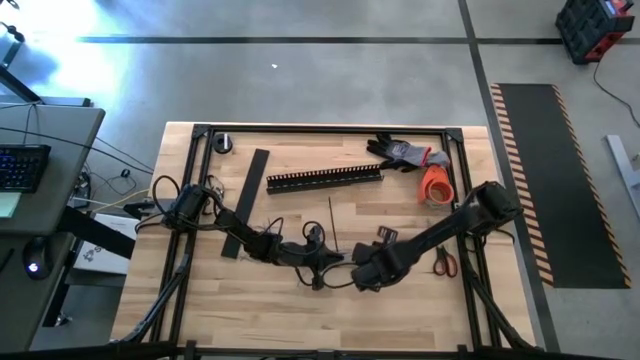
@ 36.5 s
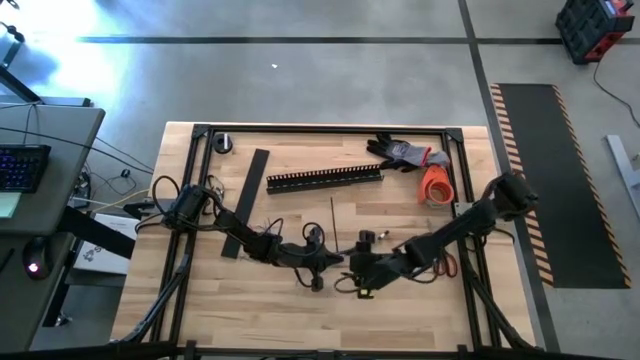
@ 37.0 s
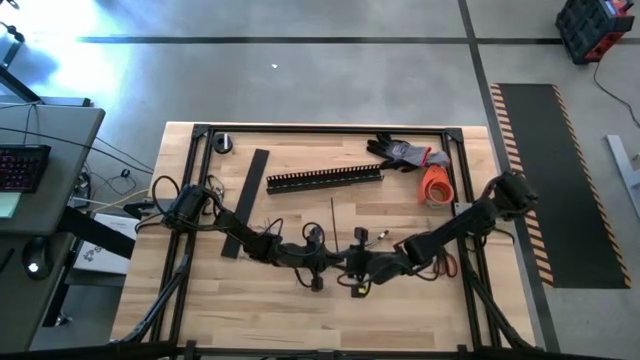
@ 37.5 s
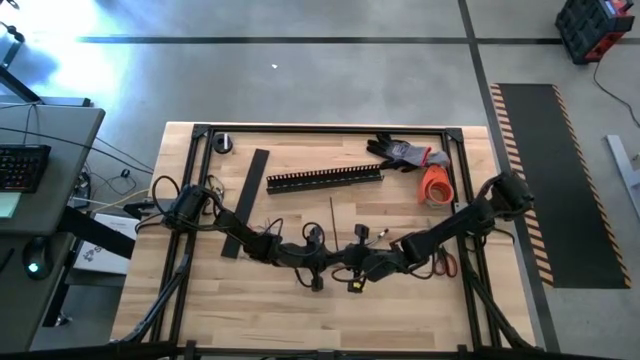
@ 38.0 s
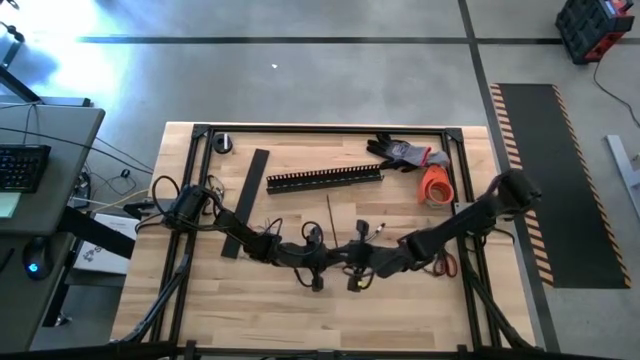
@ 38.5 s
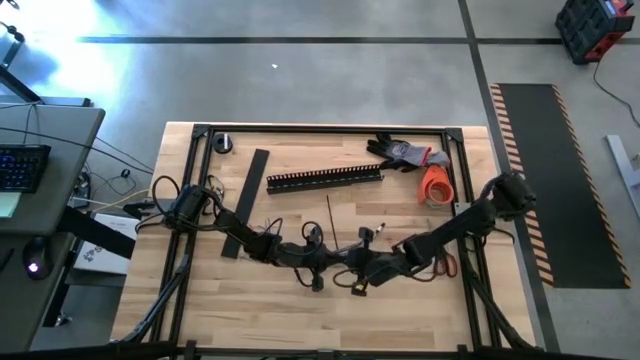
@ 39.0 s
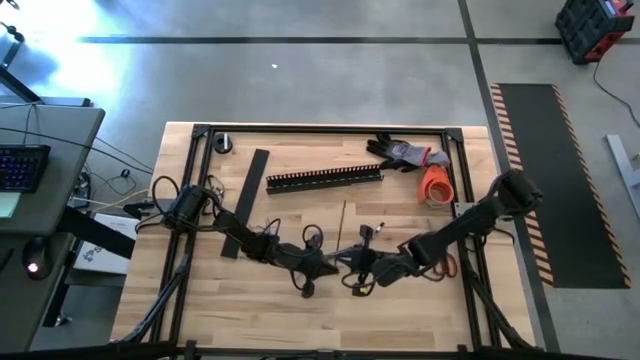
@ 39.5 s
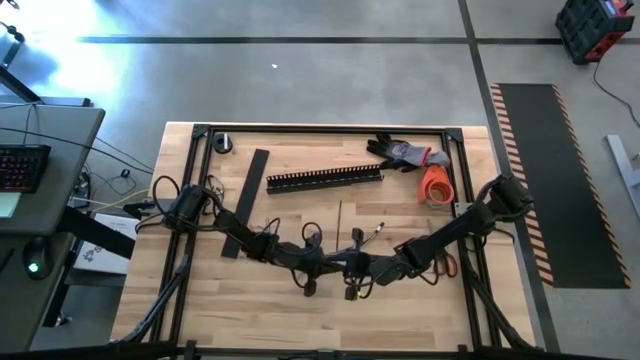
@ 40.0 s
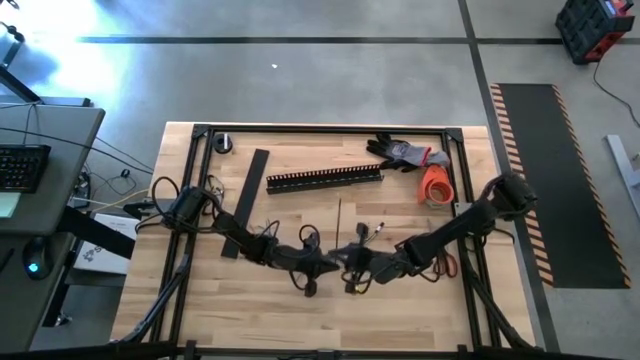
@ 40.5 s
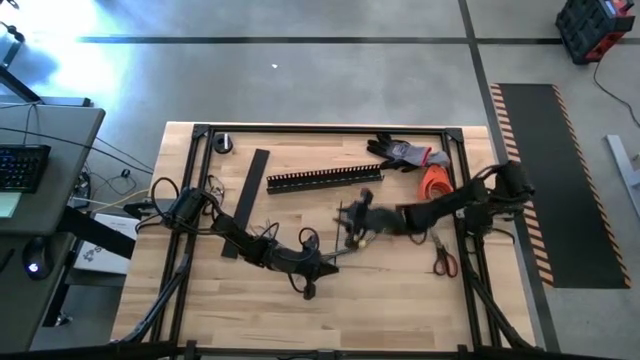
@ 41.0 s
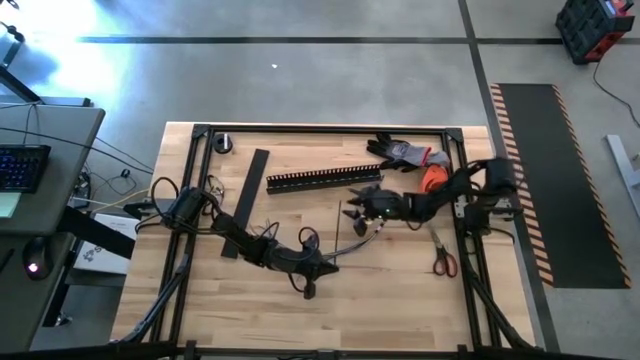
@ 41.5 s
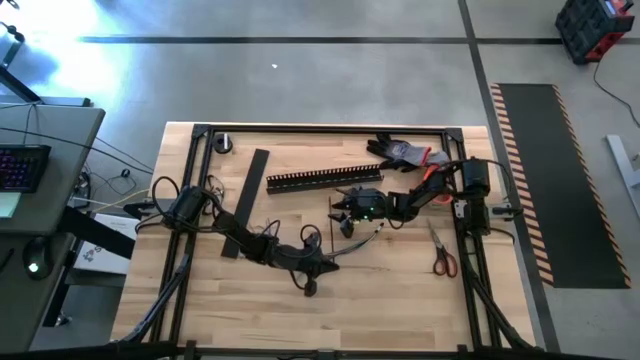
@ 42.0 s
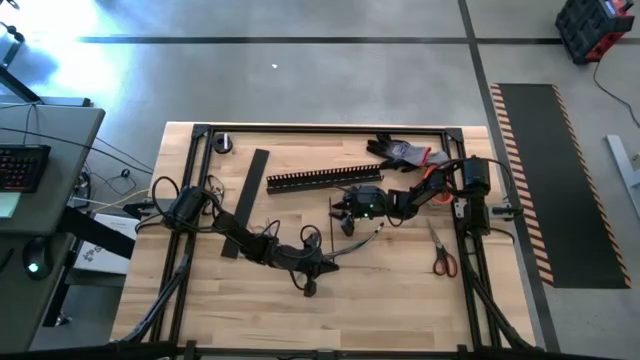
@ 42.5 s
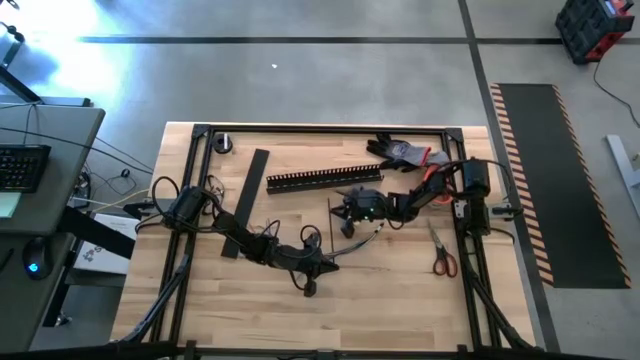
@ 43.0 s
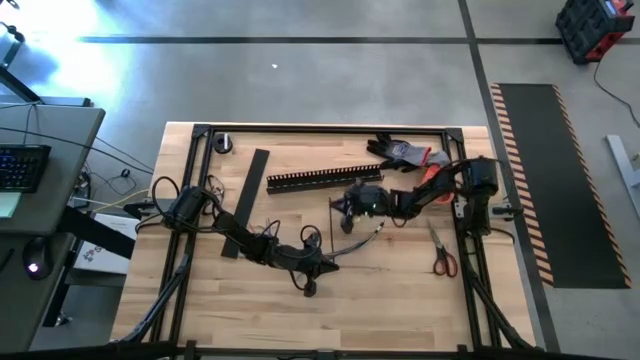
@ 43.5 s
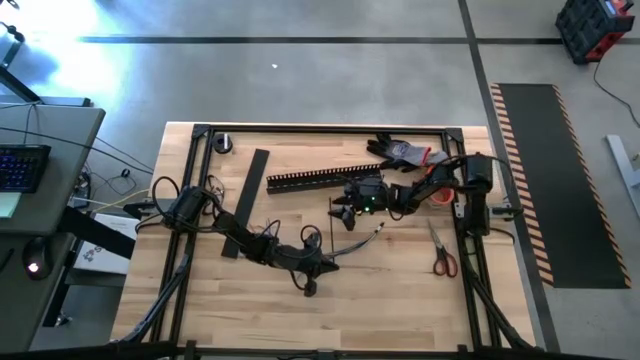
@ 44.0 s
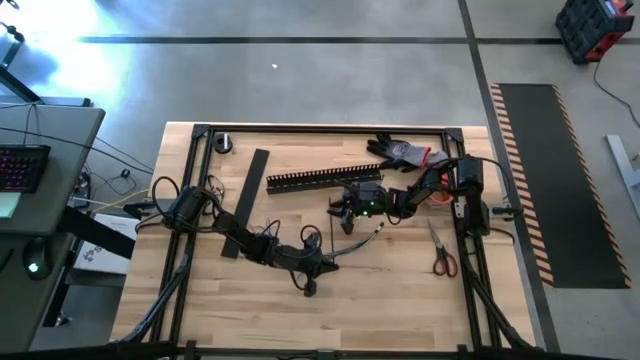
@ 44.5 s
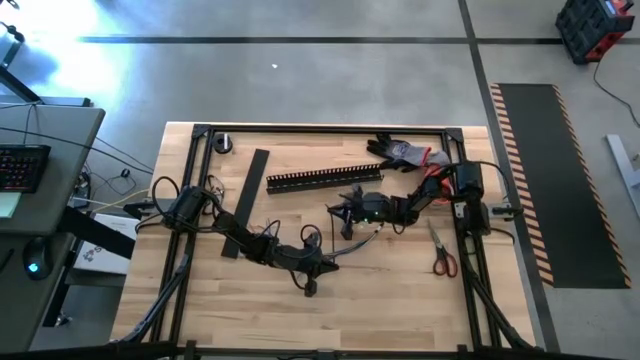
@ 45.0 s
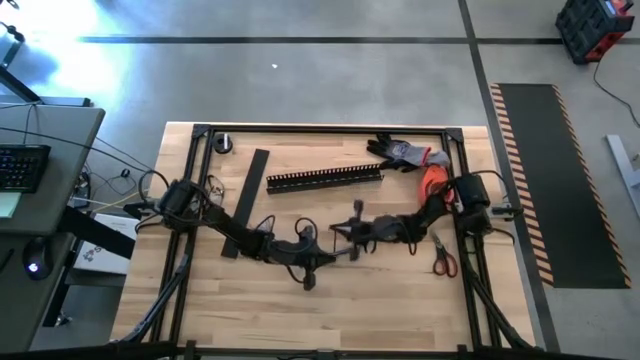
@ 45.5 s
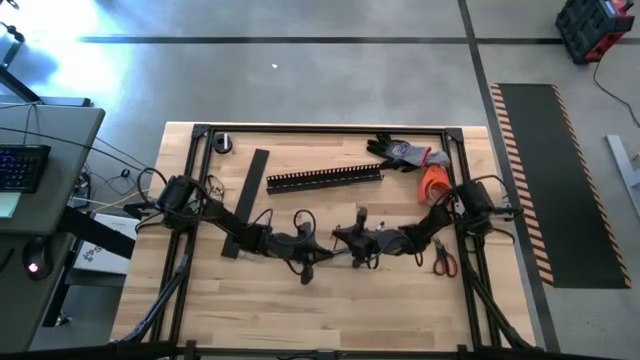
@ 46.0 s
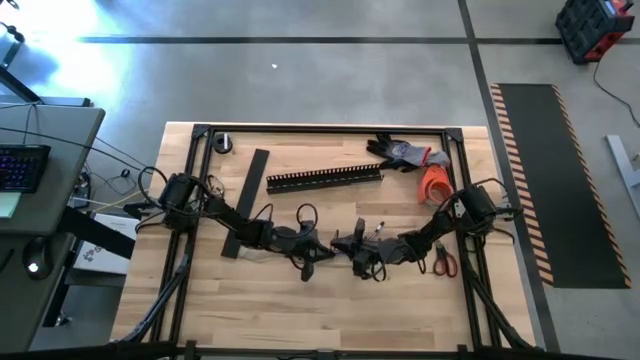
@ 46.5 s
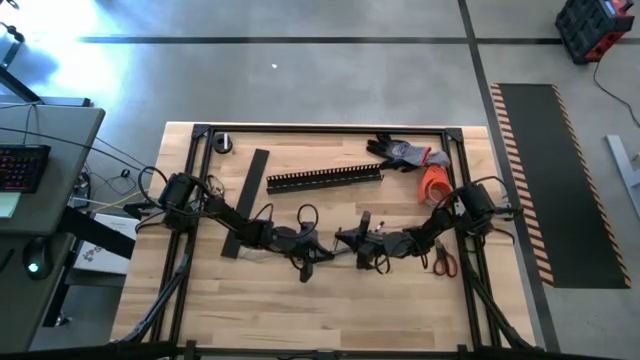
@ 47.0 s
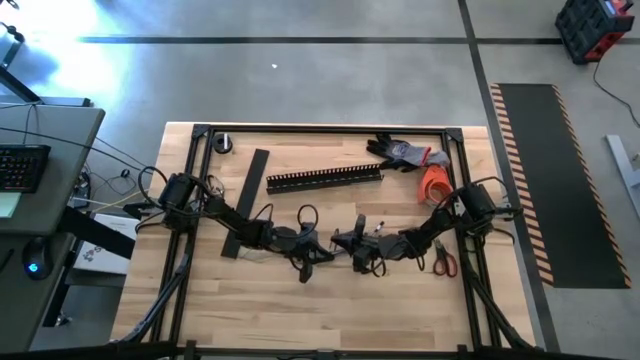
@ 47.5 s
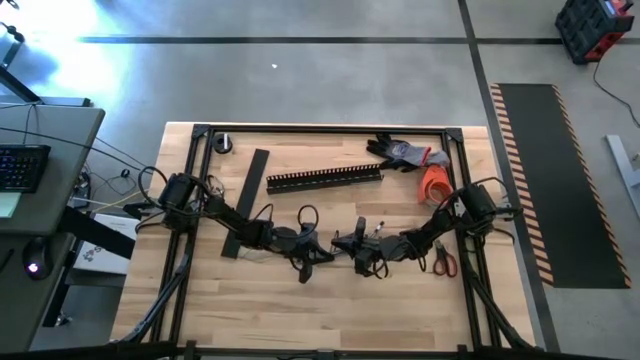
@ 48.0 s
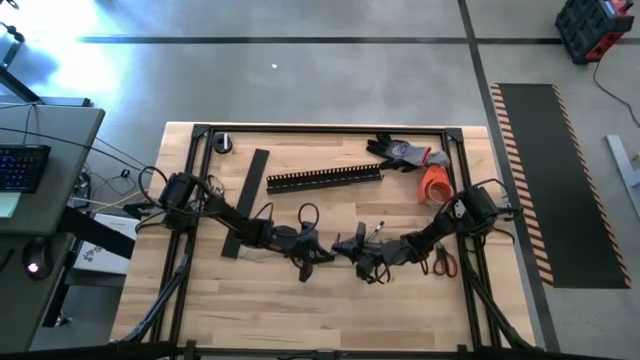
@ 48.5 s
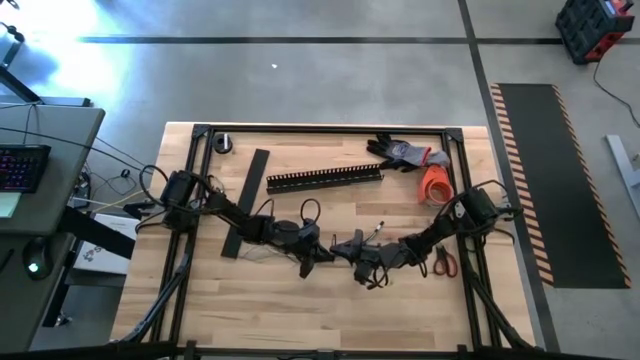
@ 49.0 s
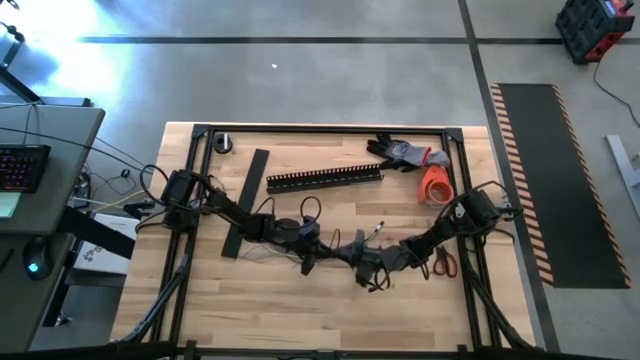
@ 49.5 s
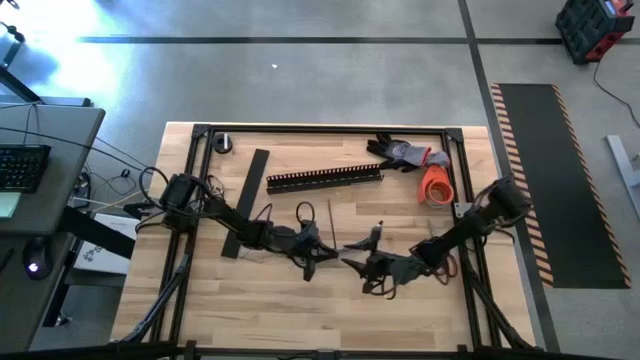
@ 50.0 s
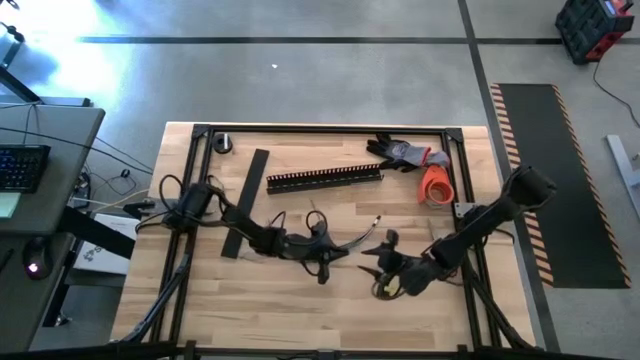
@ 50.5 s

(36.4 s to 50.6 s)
Task: Ziptie cables
Wrap the cables together using a zip tie
